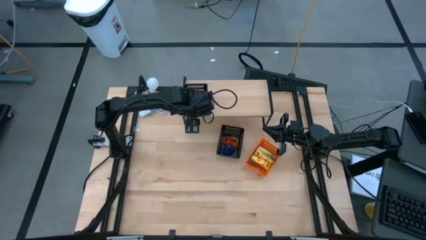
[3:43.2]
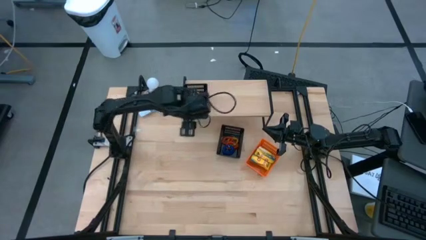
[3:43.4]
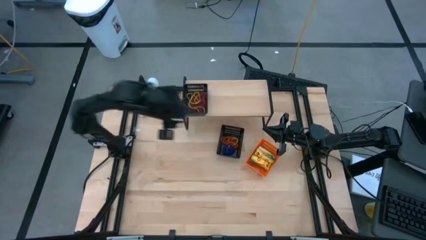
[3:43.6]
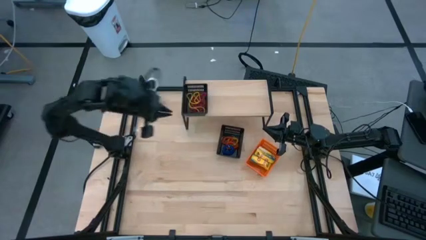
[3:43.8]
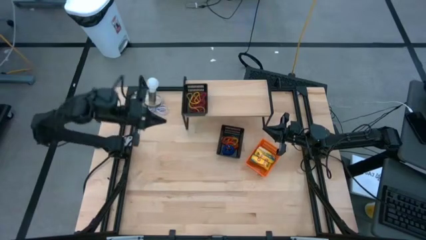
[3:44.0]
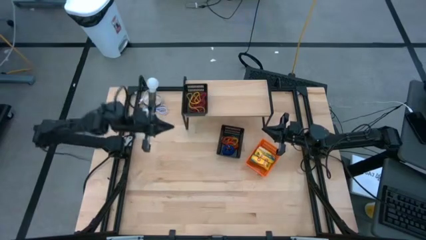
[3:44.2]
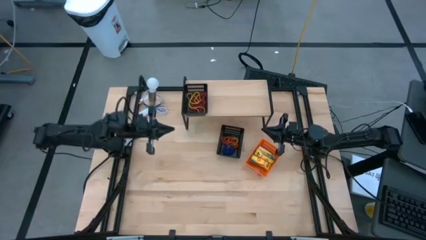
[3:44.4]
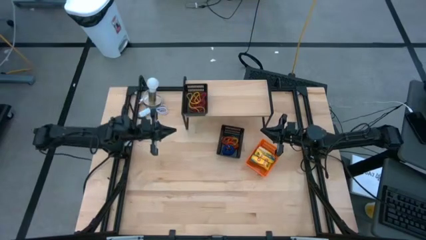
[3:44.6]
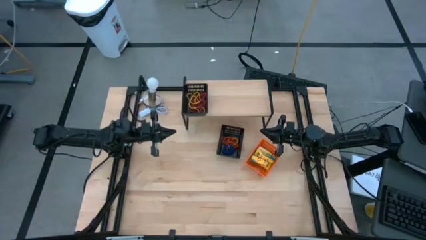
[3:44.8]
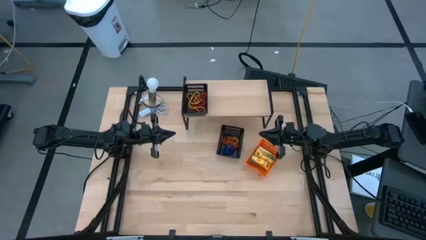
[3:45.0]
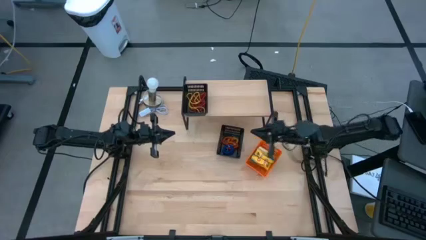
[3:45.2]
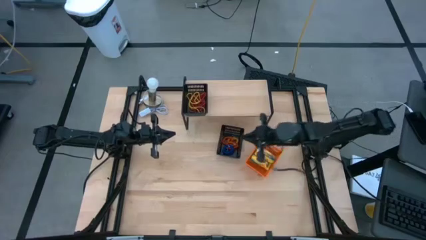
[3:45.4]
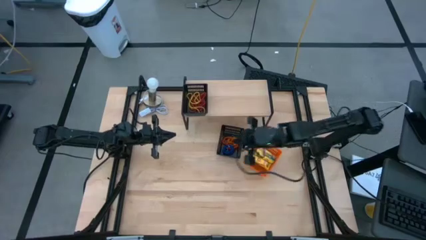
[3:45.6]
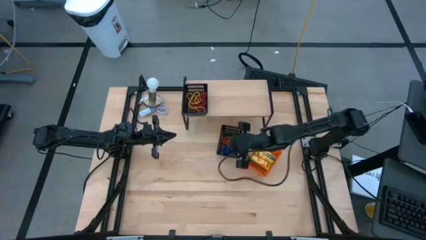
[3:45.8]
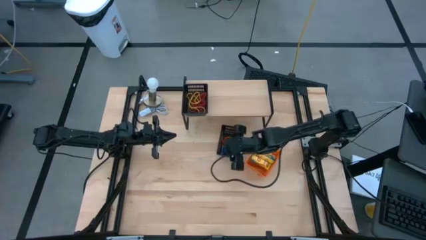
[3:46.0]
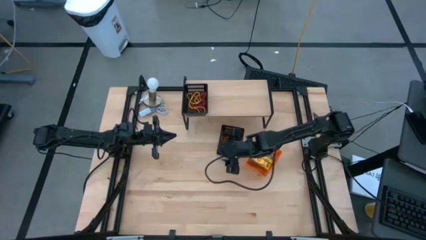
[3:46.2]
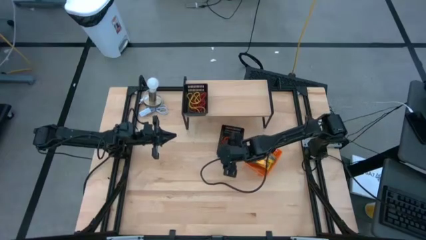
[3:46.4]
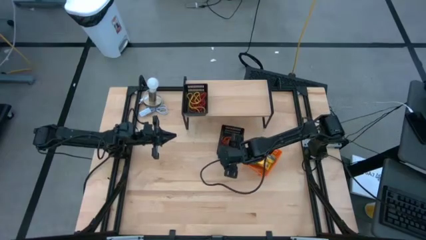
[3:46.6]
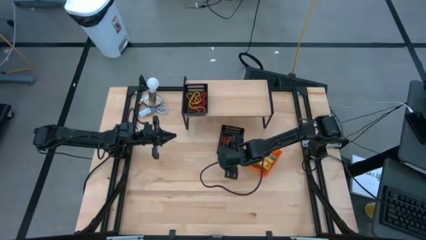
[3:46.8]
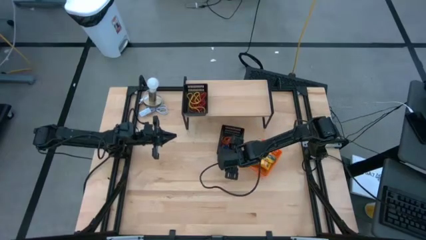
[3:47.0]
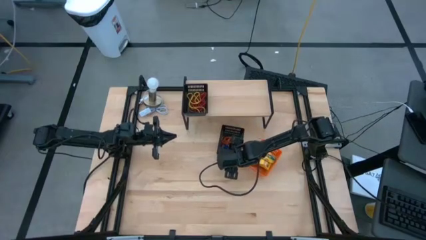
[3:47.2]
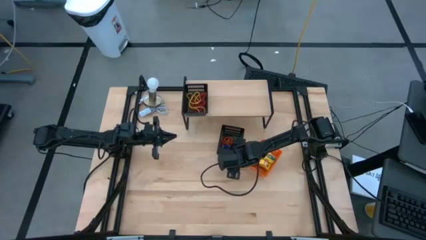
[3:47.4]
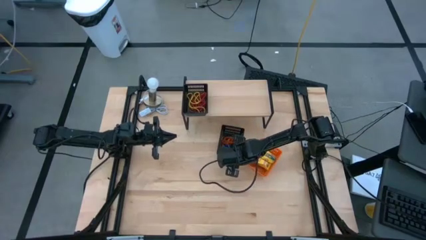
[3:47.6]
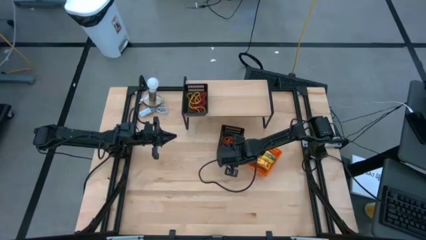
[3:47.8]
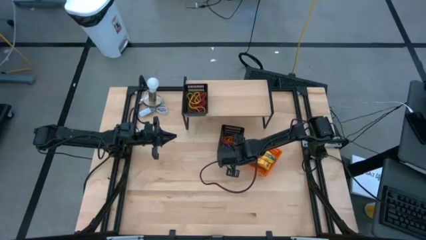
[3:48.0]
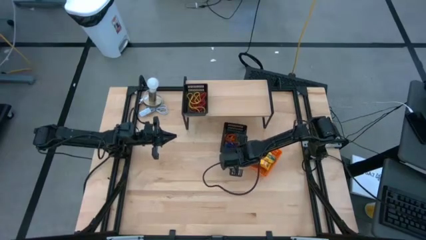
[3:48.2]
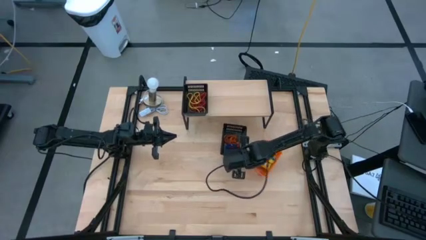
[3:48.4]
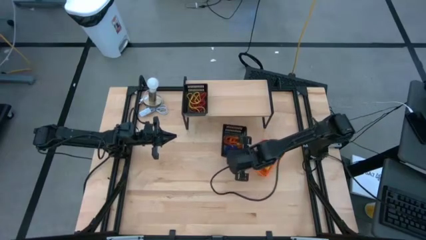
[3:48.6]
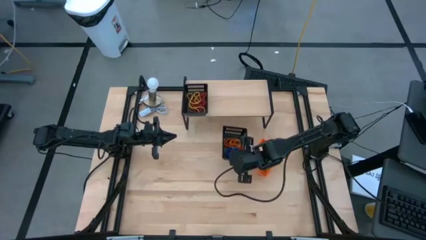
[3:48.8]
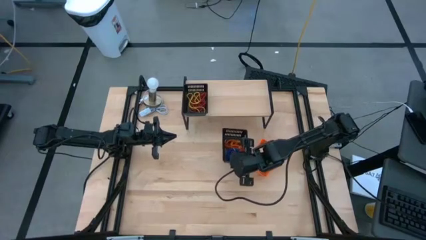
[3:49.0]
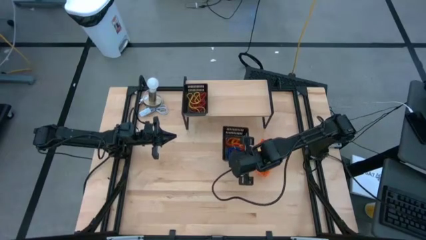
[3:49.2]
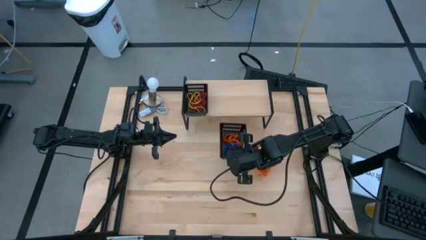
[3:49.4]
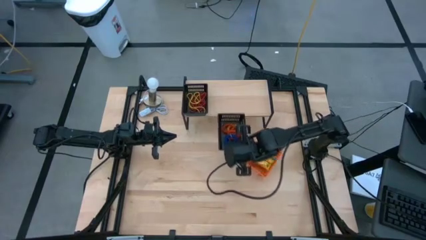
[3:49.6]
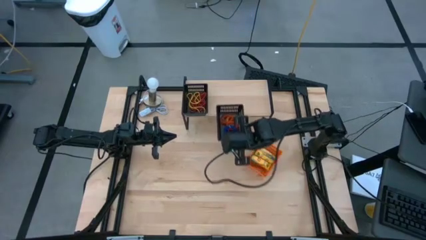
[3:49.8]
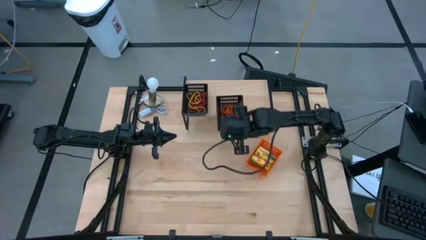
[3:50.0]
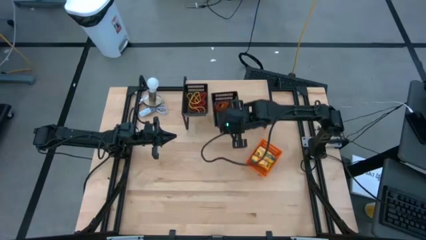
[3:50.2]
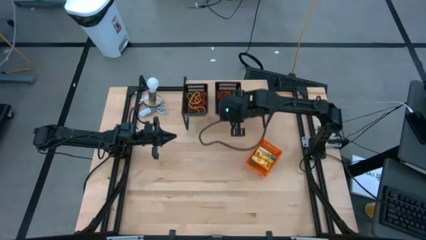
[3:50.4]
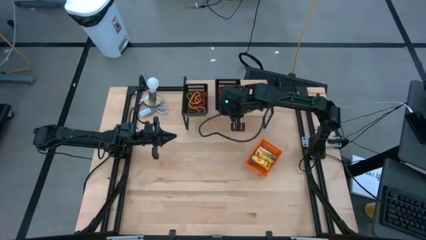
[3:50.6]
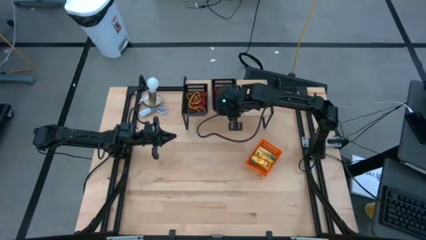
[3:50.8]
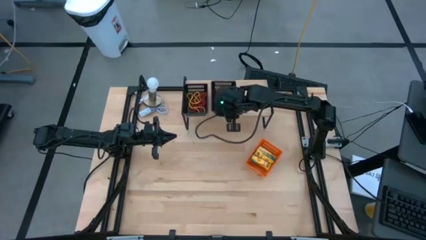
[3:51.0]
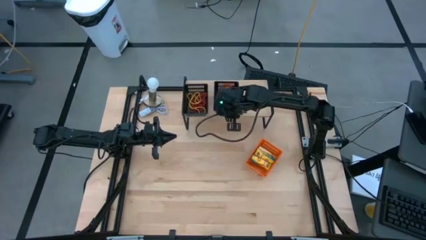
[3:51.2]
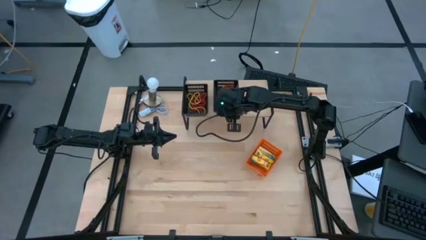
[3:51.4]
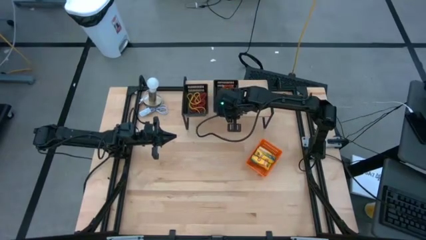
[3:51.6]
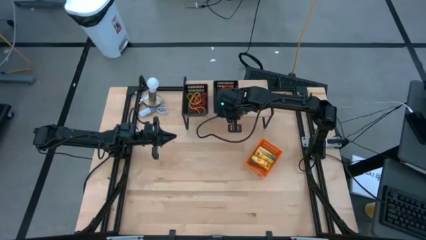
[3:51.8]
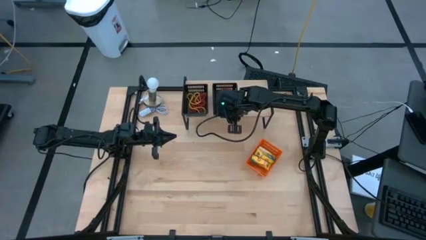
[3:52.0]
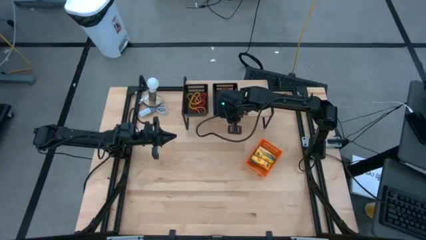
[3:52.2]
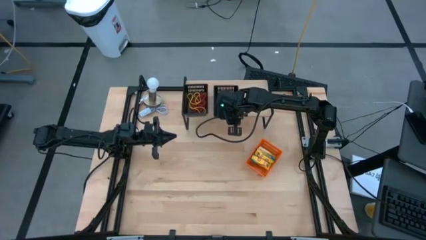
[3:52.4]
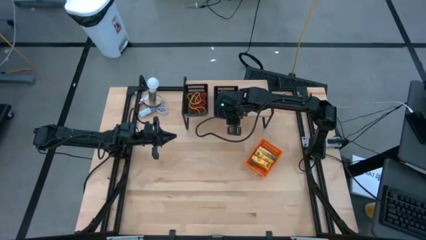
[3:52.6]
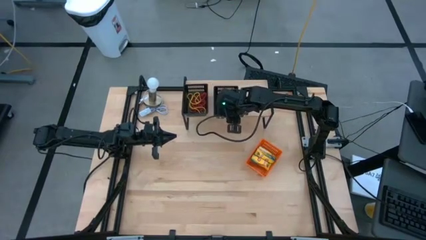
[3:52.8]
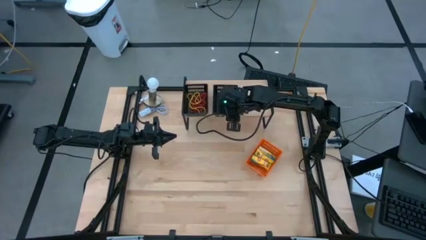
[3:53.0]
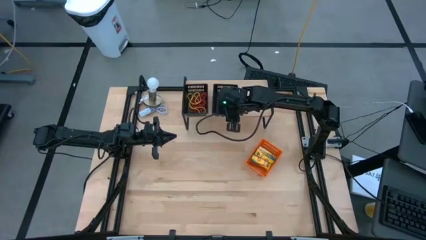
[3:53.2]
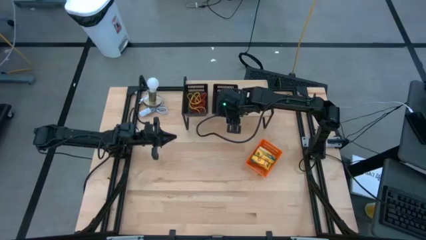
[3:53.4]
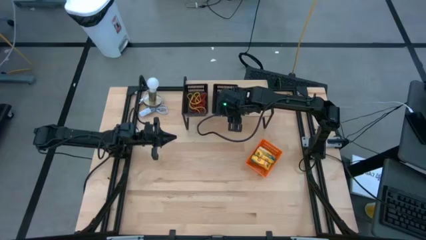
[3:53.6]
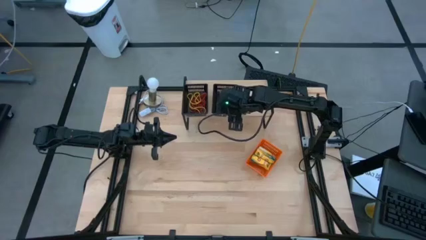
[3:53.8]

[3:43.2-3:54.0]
Task: Pick & Place Office Desk Supplies
Put the right black bin filled with spring keychains on the shelf

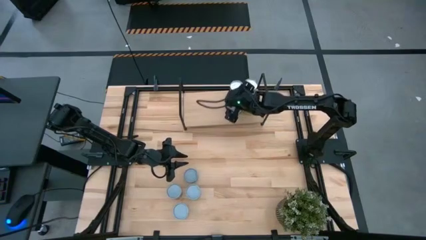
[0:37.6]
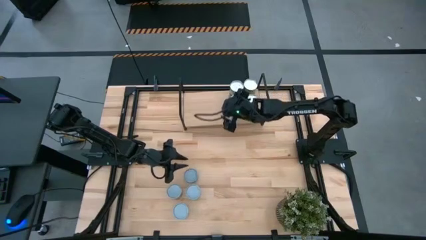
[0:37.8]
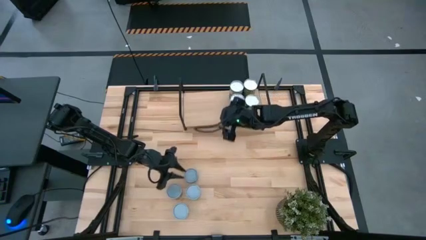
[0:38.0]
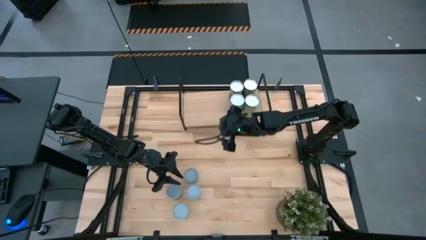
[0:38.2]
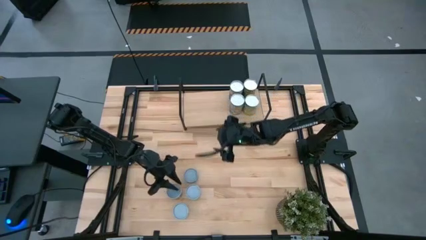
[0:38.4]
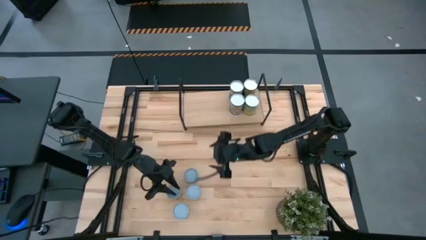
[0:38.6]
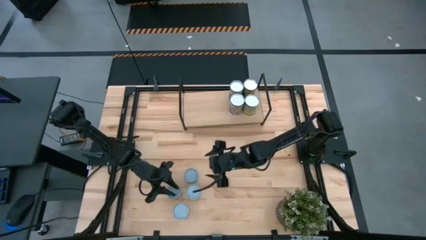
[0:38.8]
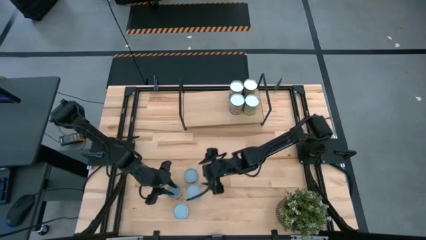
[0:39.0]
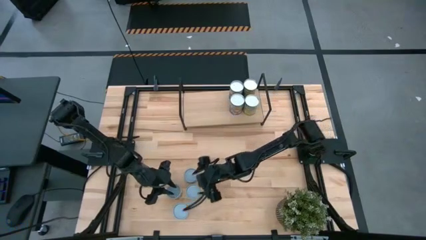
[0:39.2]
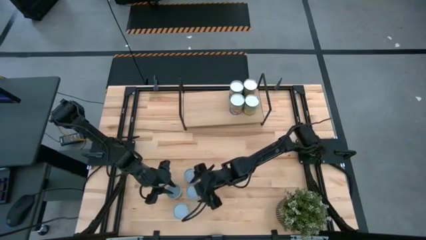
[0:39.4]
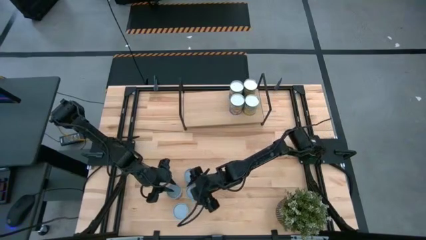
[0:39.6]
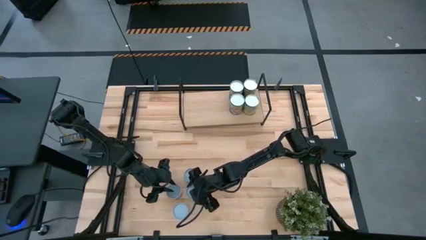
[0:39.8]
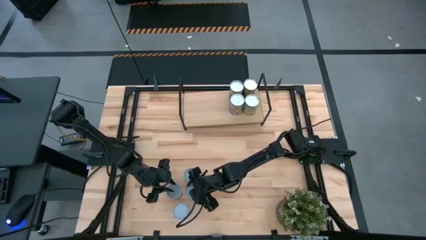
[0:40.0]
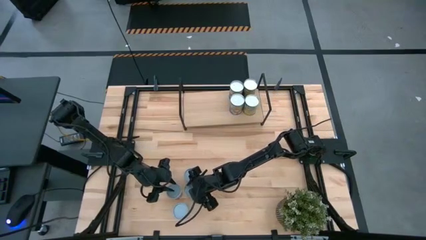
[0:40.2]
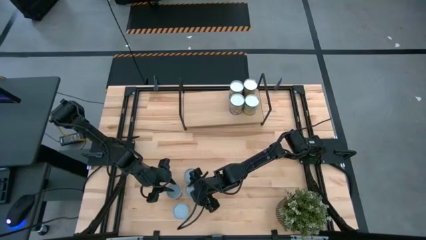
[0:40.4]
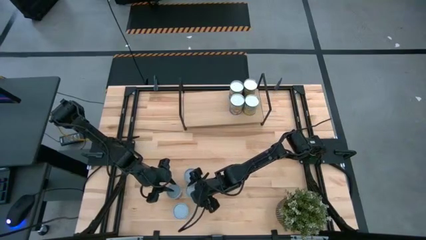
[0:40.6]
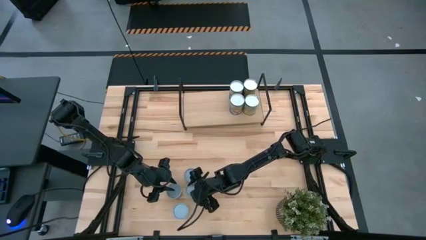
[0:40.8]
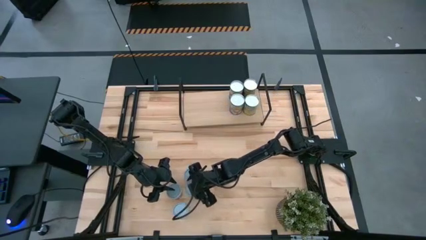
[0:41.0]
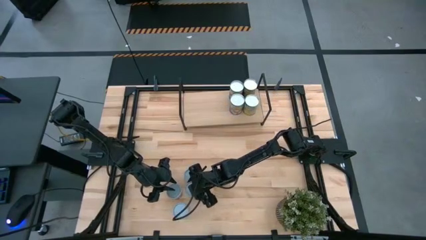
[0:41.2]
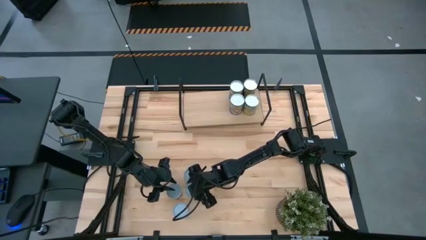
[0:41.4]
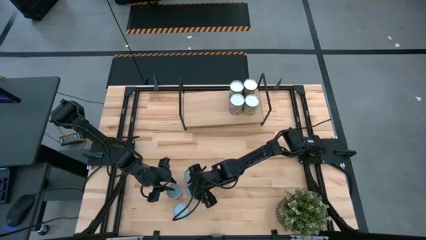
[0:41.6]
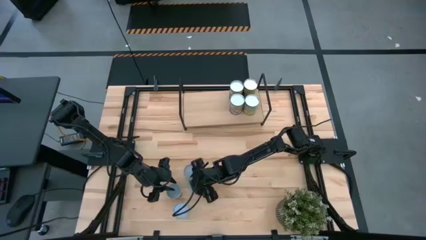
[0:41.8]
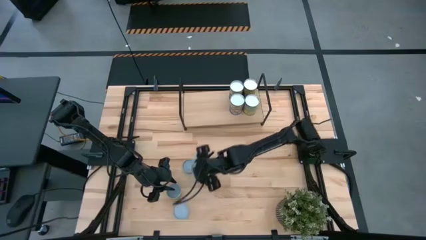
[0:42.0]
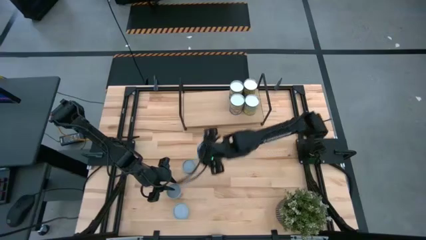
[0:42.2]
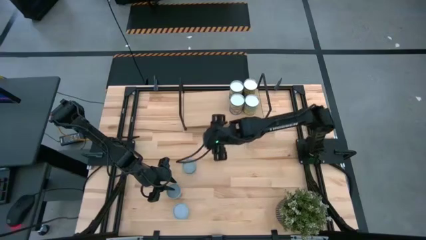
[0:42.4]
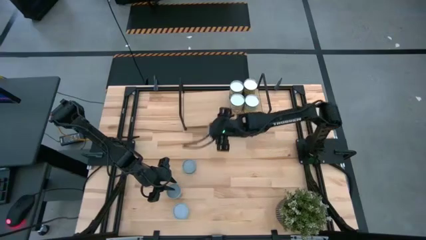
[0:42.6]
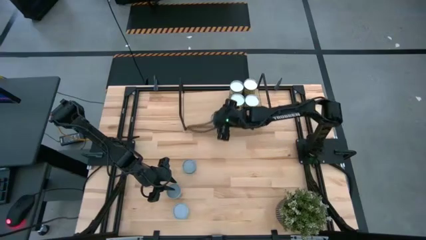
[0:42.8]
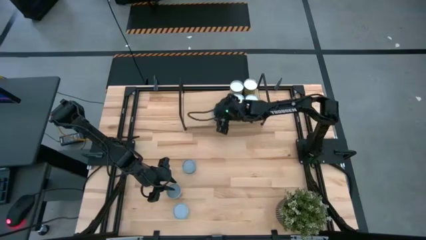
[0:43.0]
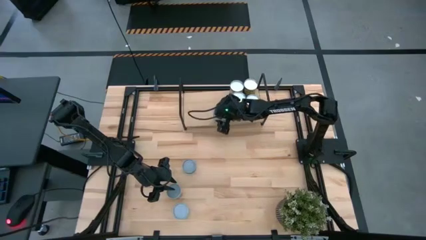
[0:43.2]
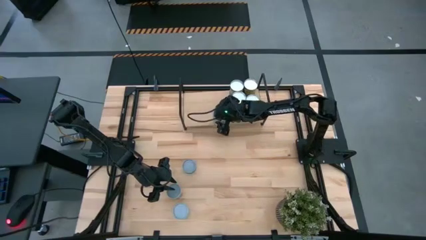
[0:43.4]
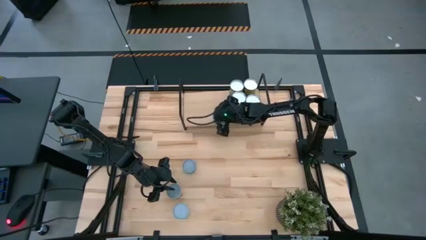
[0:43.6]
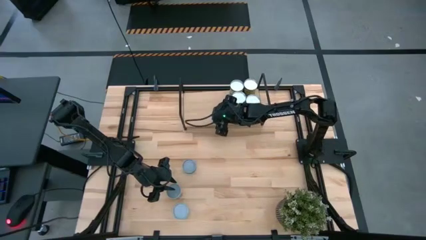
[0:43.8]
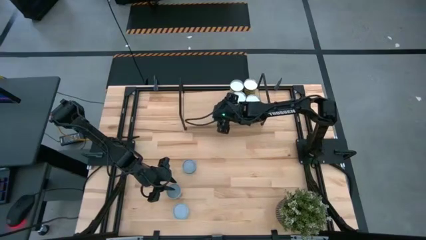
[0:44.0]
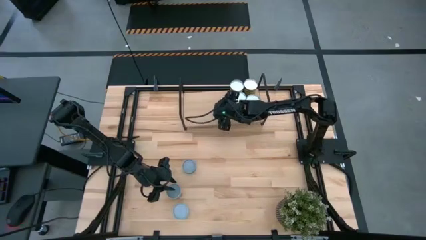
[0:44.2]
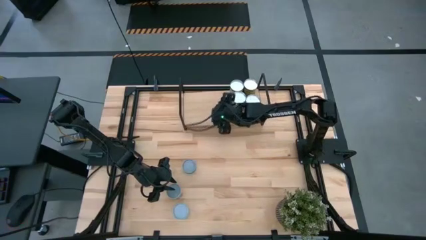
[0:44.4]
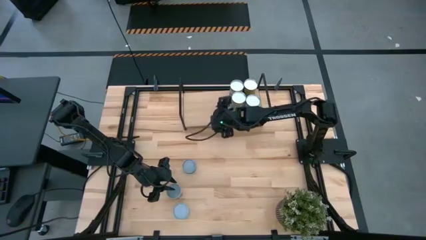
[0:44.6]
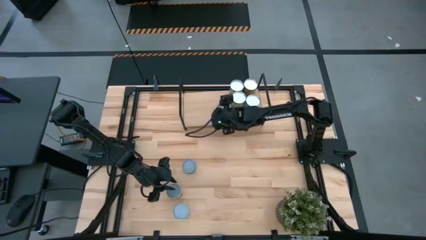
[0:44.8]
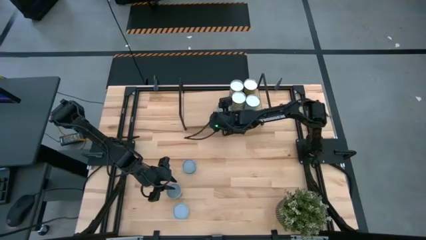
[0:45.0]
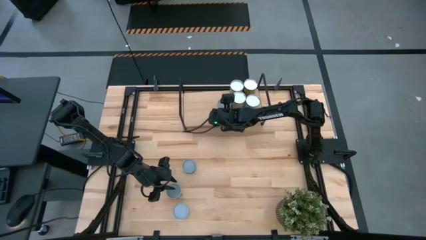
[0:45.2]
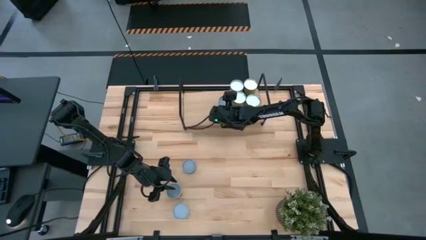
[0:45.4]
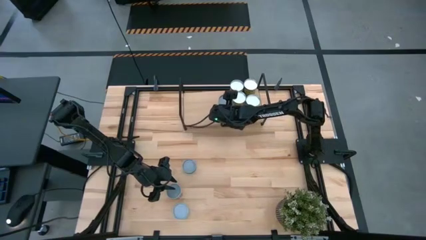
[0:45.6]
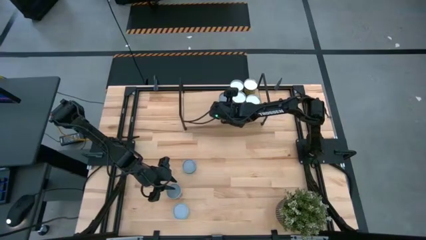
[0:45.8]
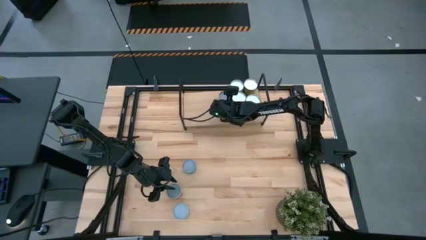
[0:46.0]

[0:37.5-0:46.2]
Task: Pick and place cans onto a shelf
Put the canned green peas on the shelf
